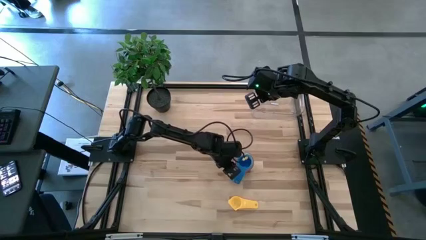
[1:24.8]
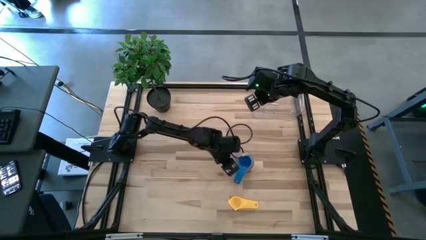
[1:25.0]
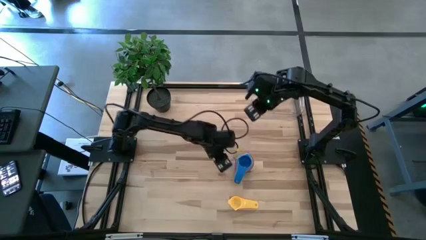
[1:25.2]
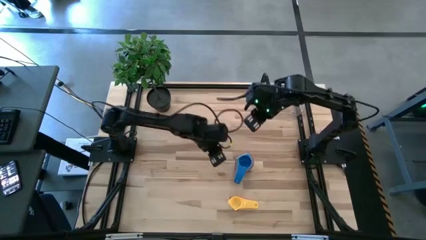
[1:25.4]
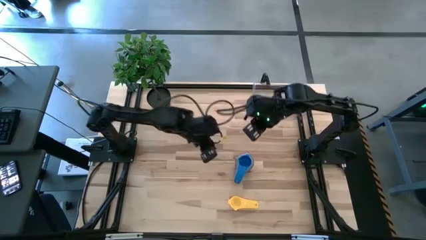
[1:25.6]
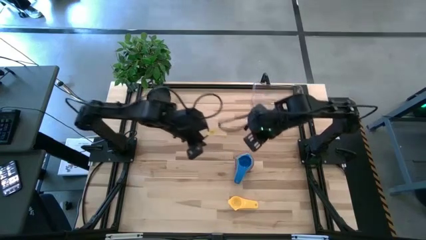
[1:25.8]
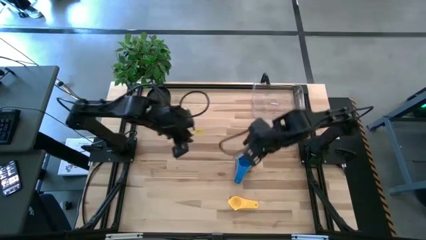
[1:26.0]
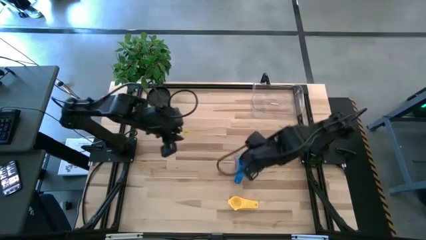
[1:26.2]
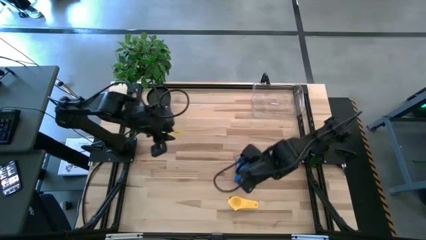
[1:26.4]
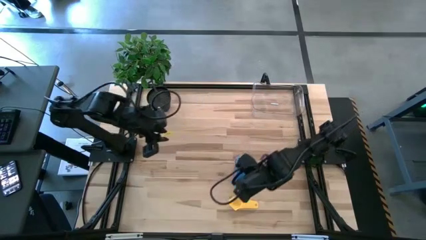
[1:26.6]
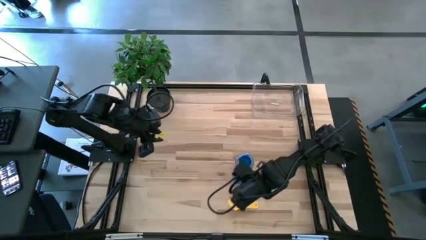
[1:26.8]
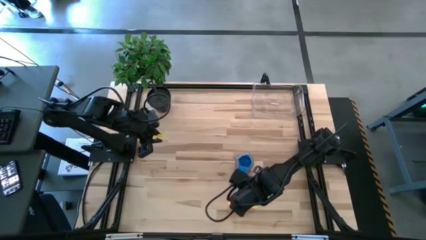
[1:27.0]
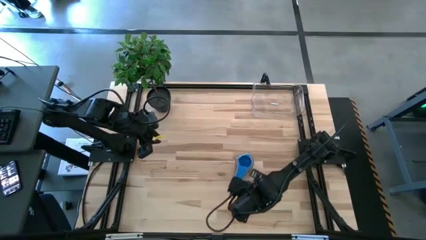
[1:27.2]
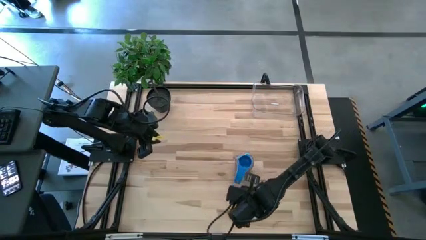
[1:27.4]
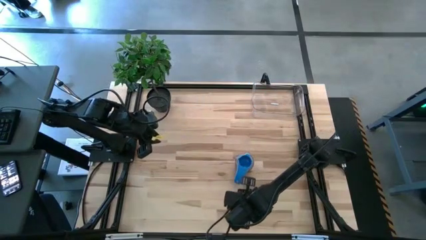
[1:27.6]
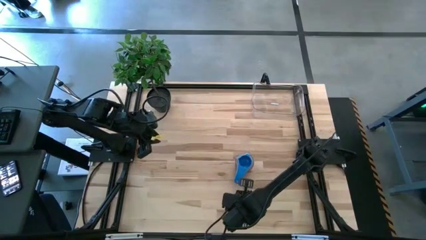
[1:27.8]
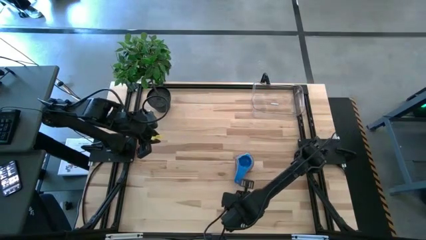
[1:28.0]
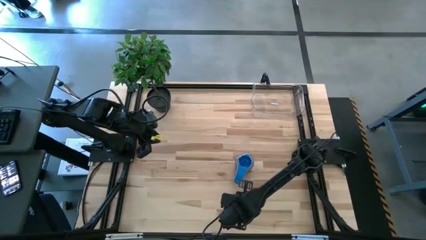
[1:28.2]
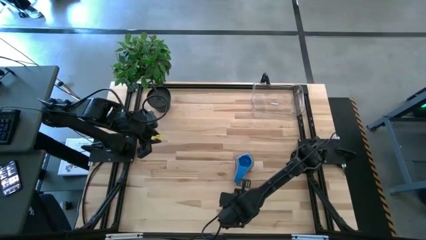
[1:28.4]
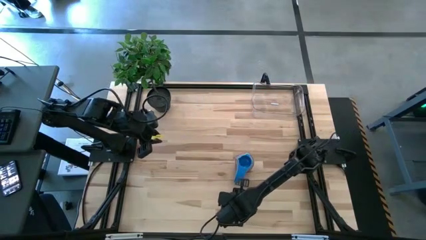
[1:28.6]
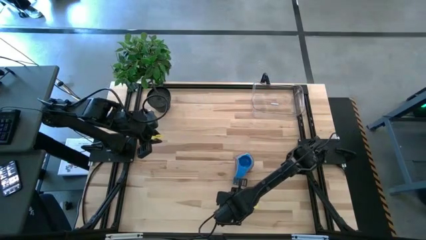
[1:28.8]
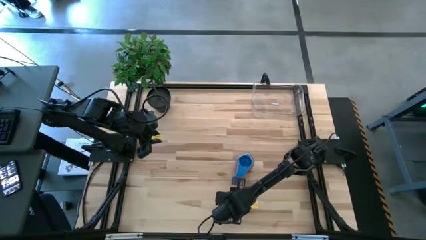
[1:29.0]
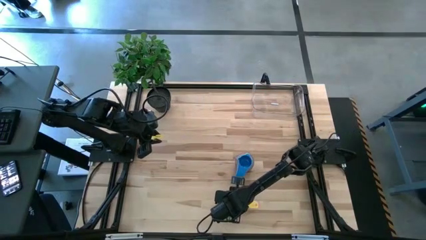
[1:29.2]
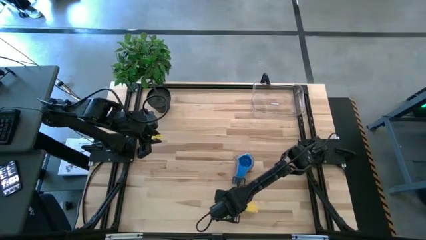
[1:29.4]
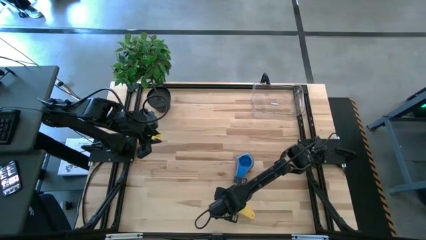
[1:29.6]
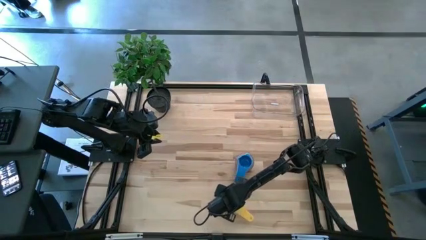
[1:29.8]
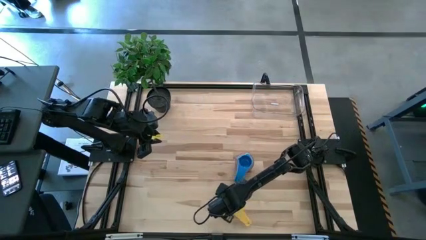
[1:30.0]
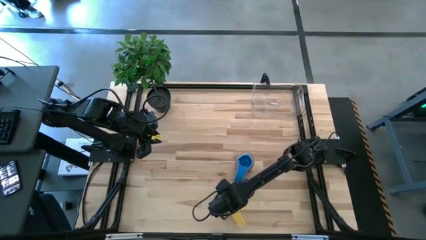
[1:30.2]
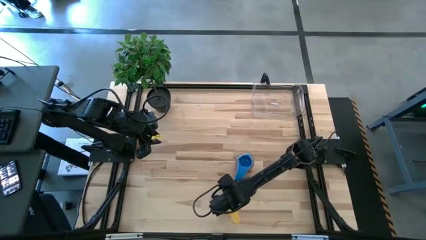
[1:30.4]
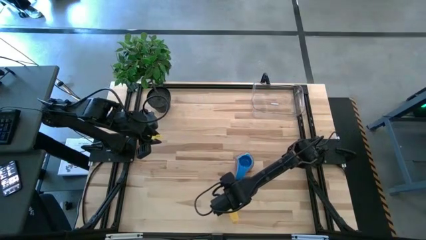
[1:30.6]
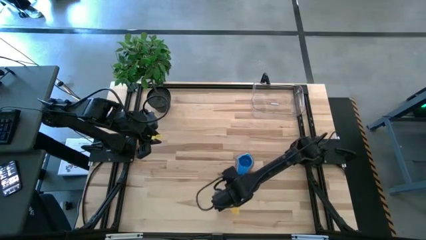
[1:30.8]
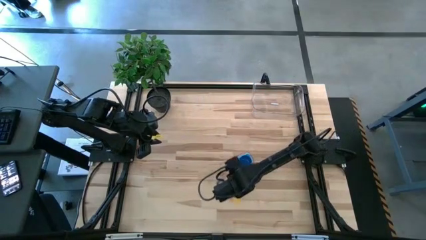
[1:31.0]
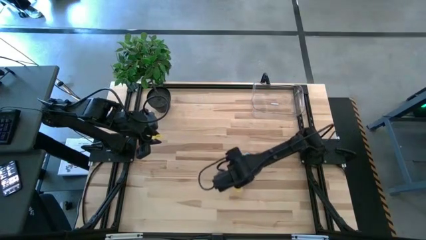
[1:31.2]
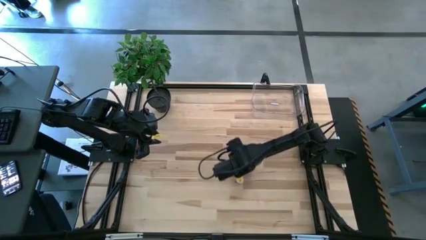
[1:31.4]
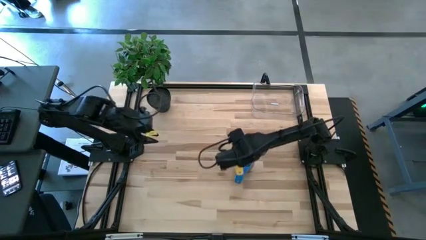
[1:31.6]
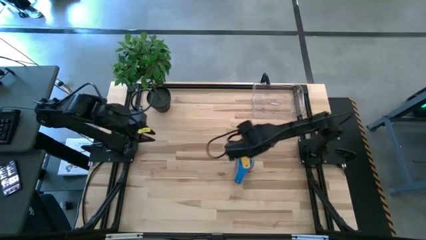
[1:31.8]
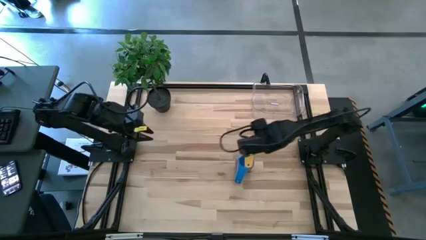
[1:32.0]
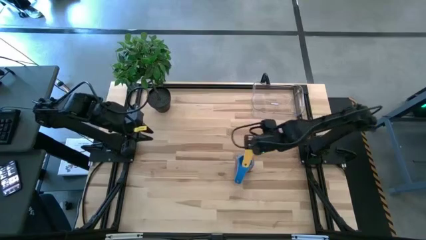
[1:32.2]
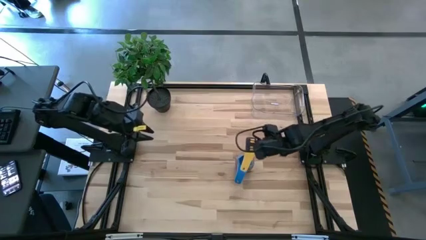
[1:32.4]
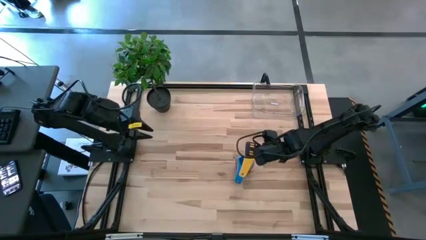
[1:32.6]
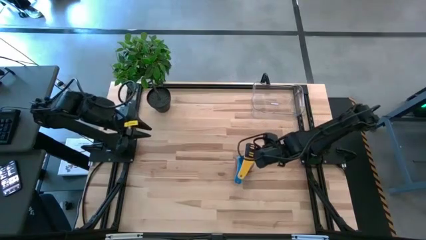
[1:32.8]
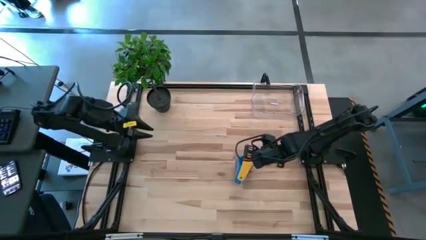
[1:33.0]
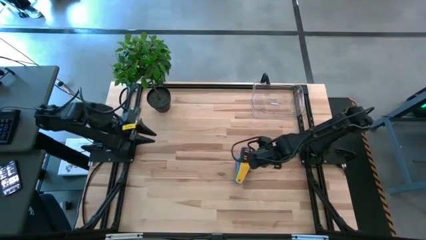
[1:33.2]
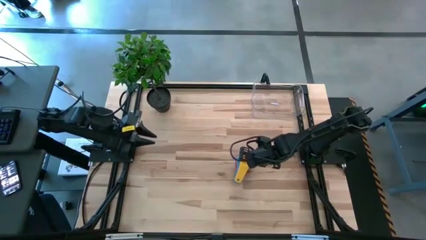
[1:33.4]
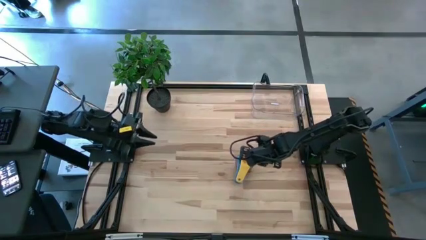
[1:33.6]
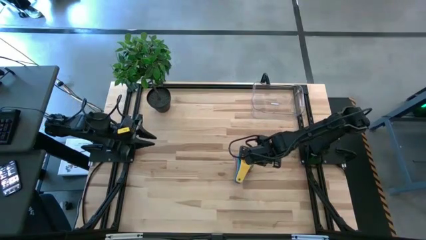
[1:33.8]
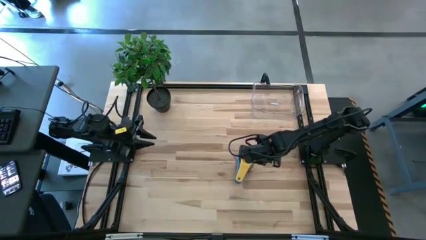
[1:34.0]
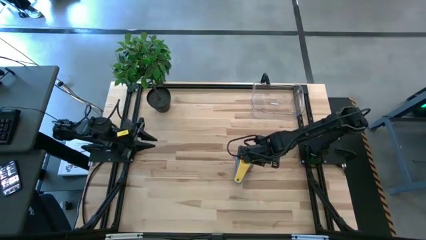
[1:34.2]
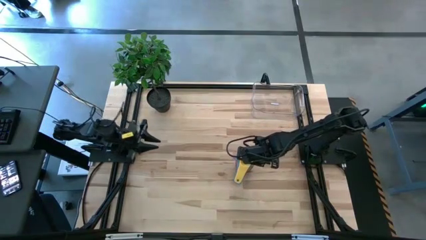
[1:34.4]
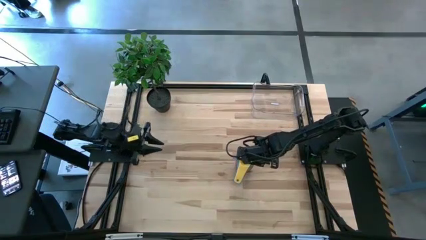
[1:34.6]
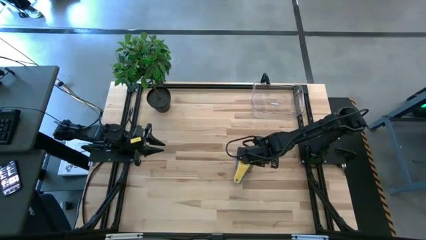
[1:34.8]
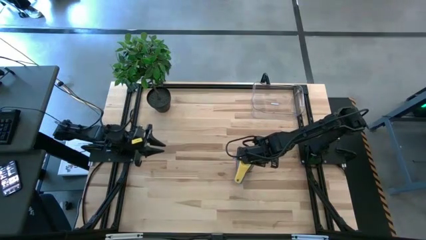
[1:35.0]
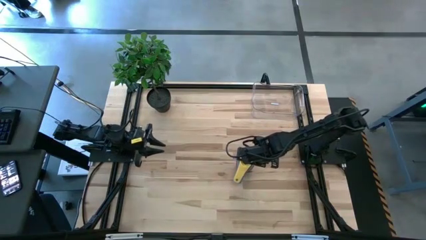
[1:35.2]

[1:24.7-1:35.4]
Task: Nest measuring cups in basket
Stack the yellow measuring cup on top of the blue measuring cup
